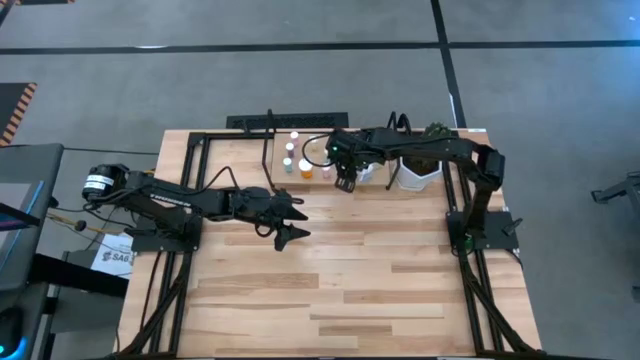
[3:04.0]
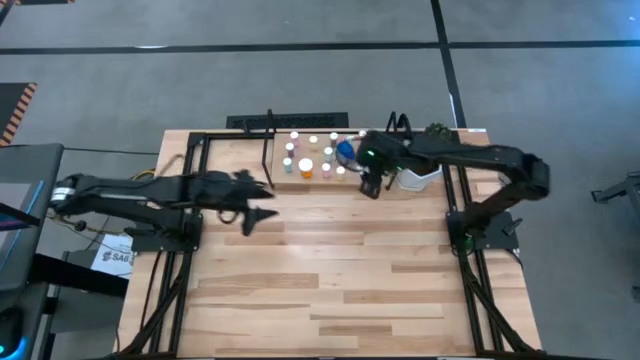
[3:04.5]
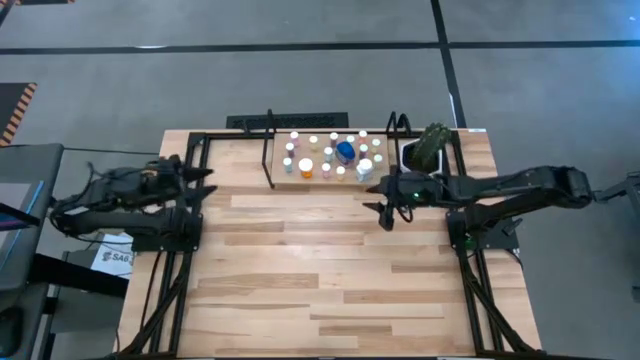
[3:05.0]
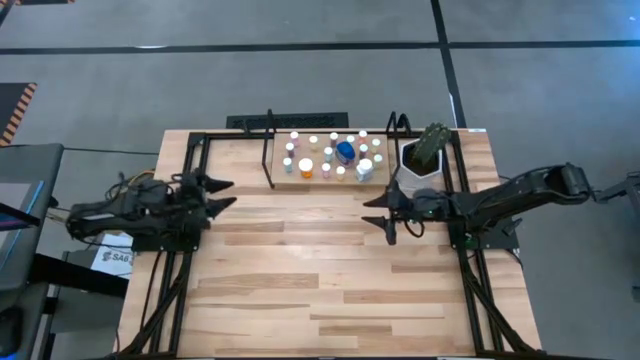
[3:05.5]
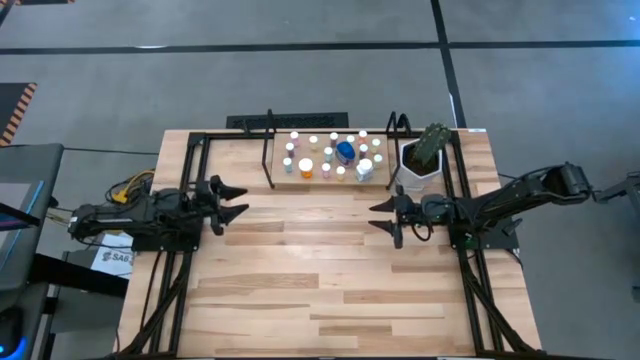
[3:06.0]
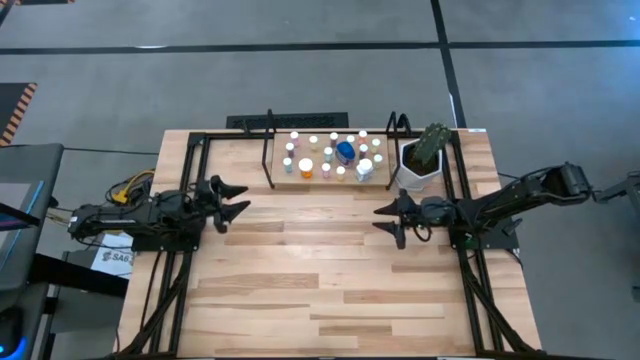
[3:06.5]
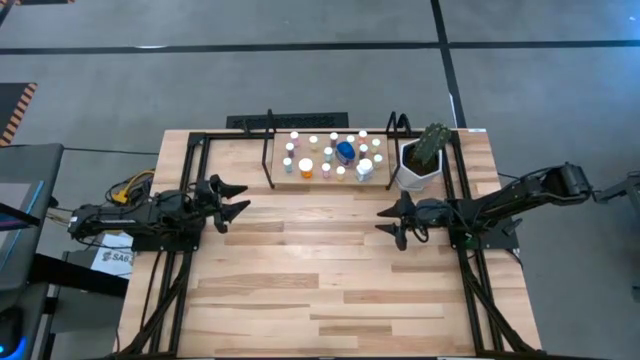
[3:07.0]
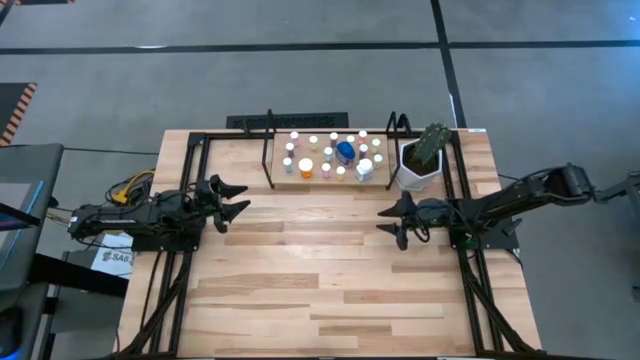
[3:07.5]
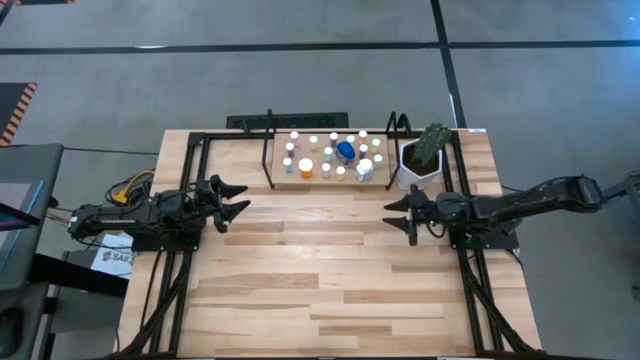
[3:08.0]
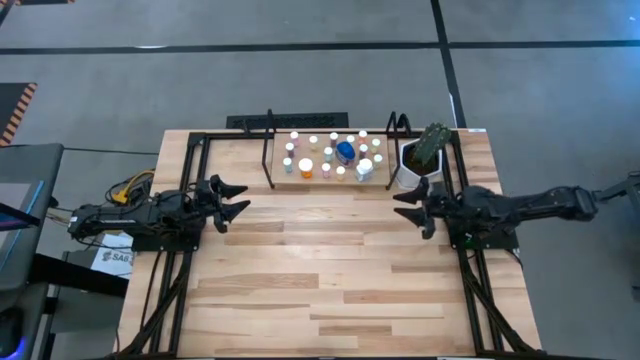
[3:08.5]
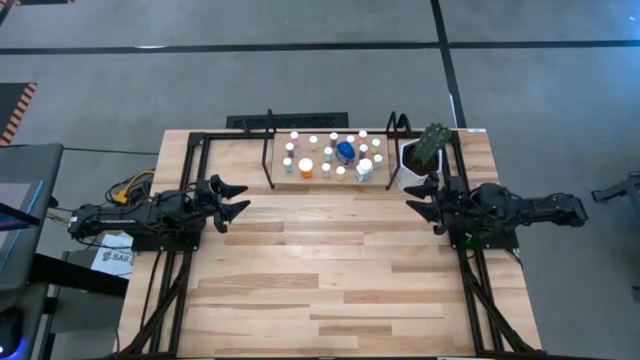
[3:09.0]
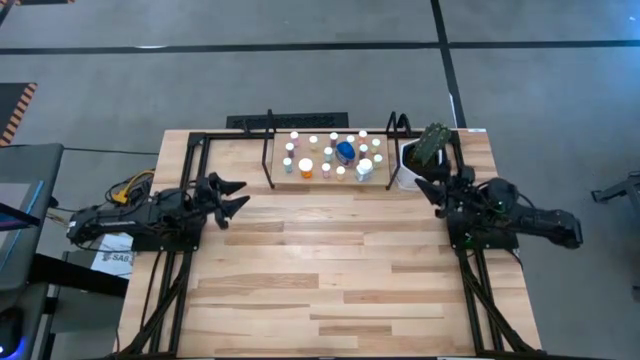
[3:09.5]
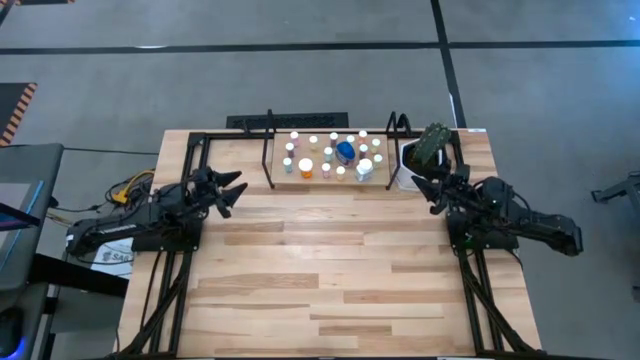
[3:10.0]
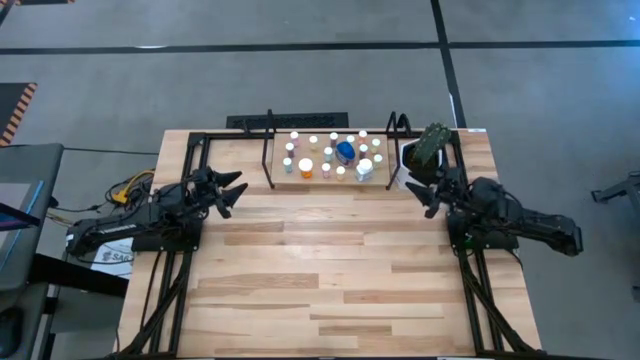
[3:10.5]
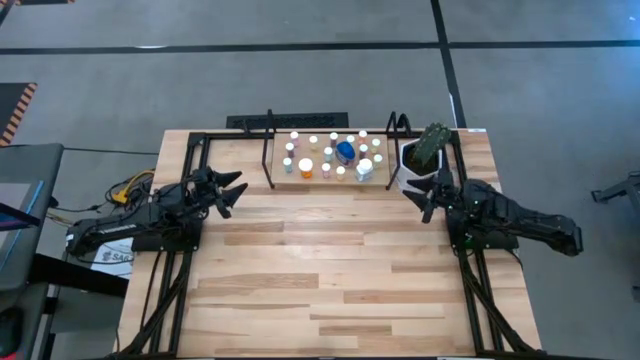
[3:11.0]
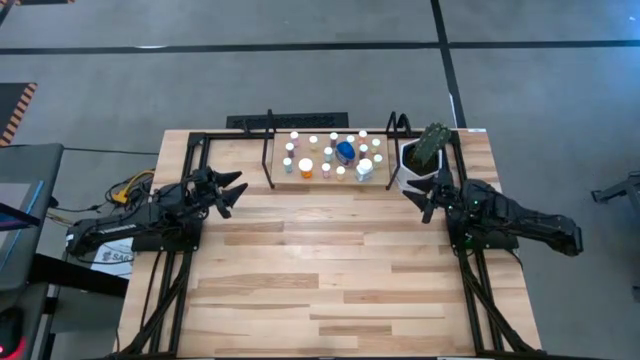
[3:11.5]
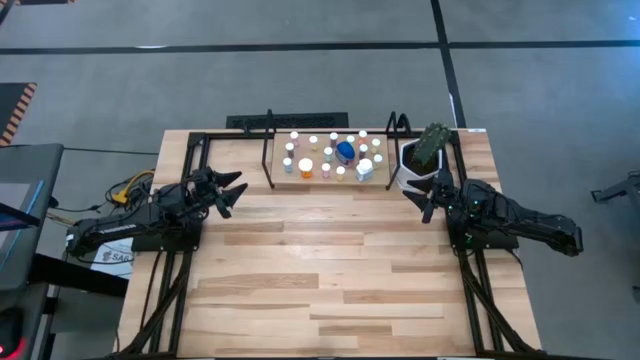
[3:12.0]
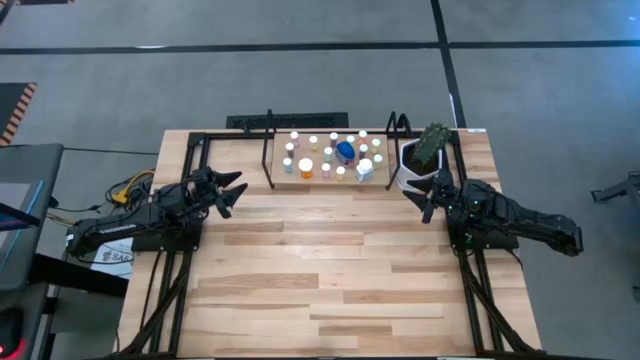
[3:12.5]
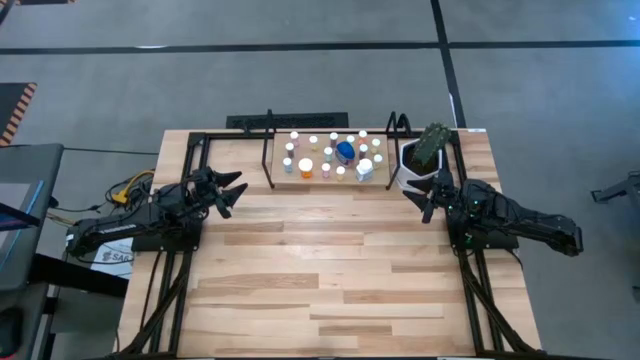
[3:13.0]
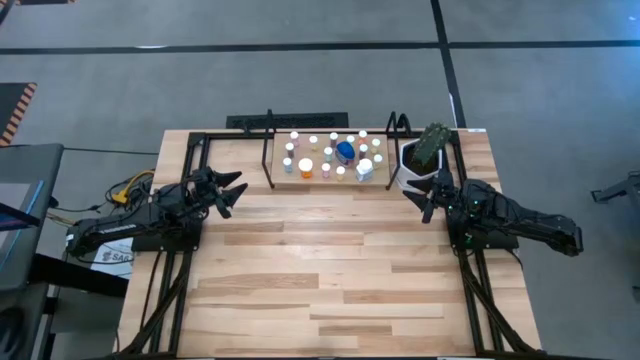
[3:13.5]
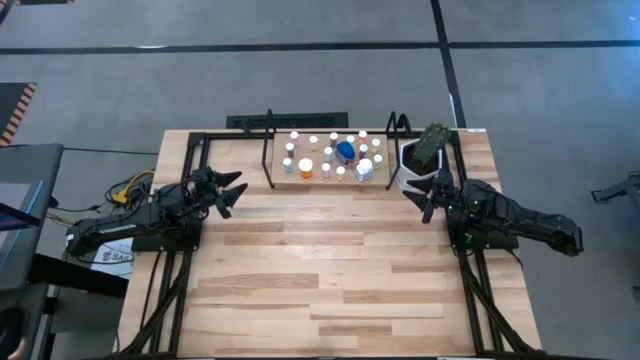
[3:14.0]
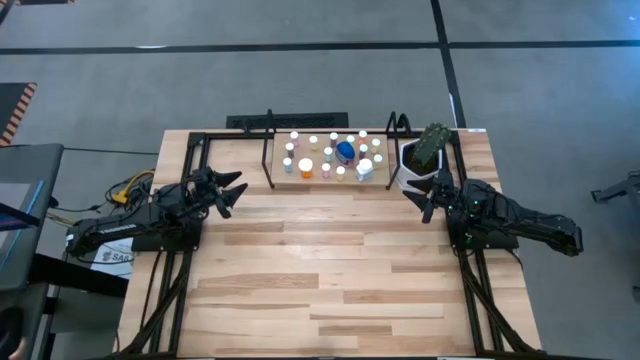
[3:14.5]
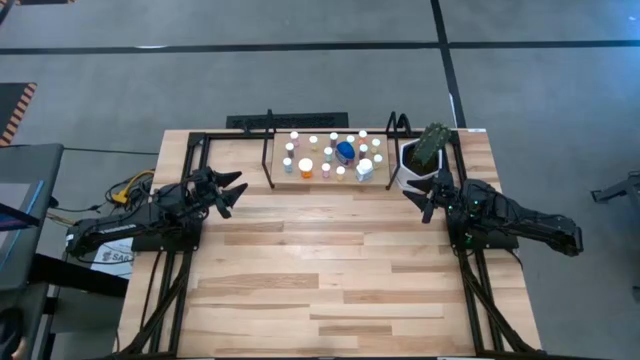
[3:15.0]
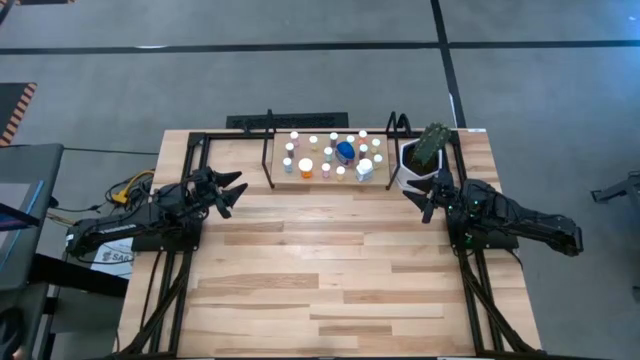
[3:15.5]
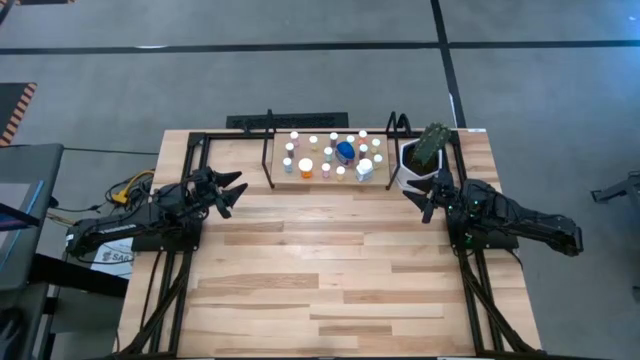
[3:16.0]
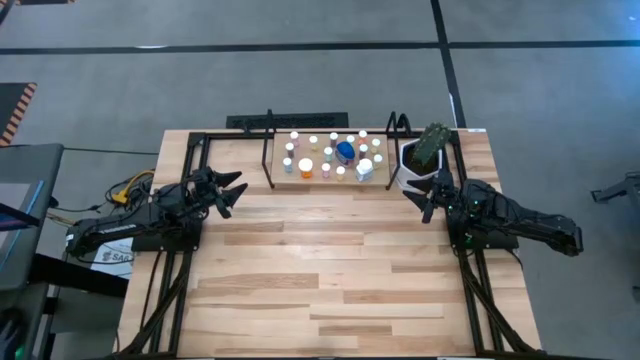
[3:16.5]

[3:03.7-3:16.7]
Task: Pick and place medicine bottles onto shelf by color
Return to Home position

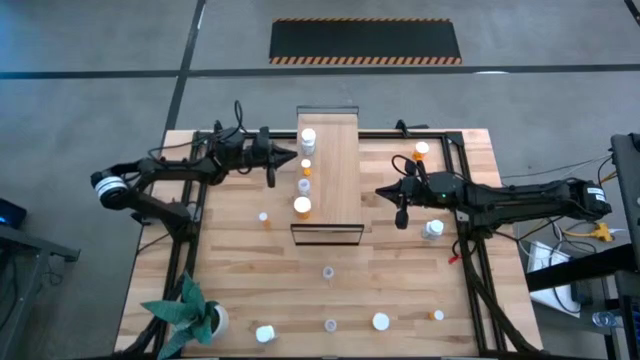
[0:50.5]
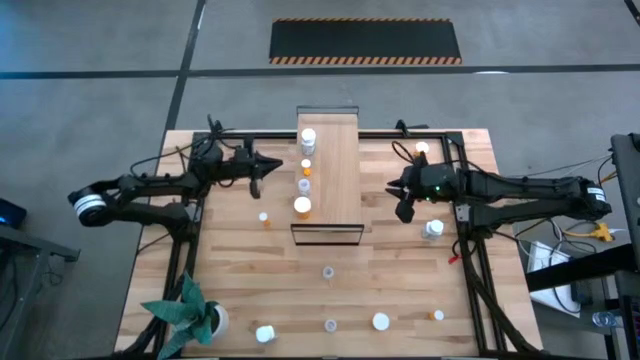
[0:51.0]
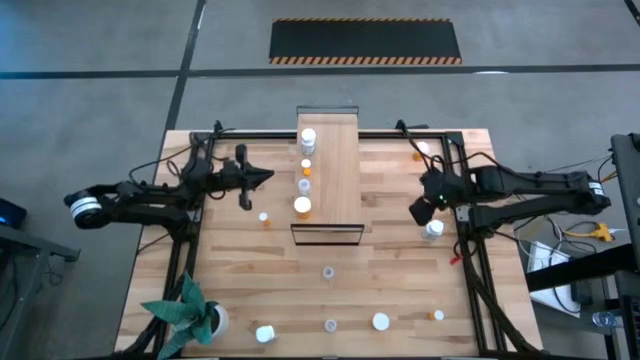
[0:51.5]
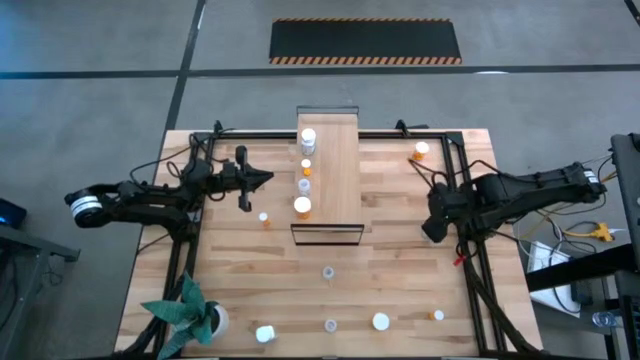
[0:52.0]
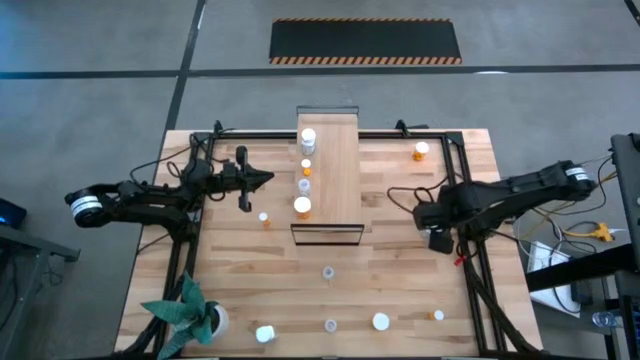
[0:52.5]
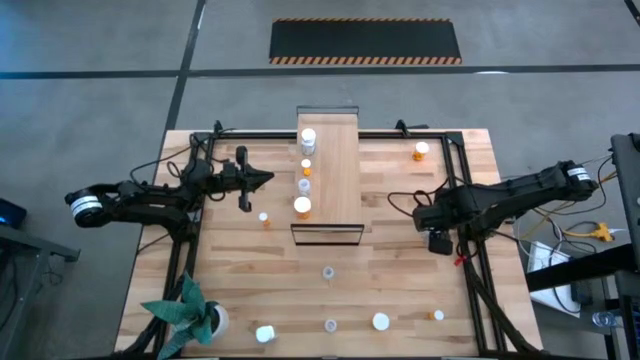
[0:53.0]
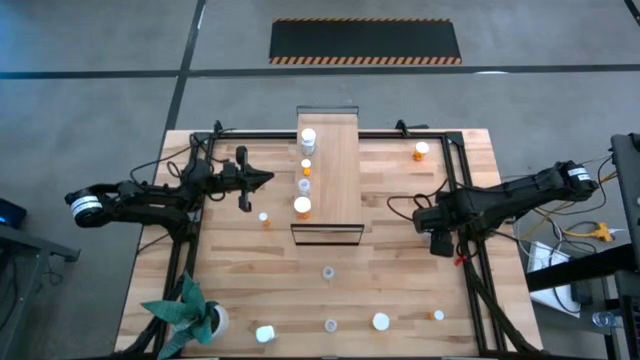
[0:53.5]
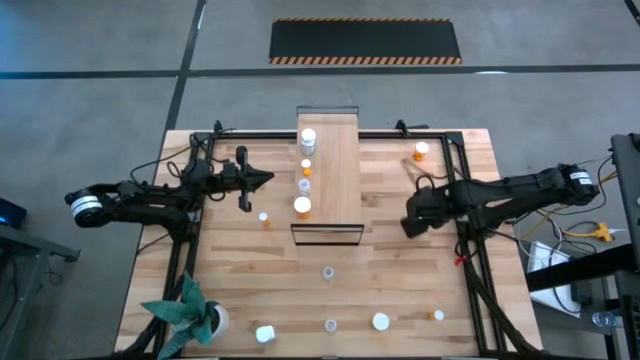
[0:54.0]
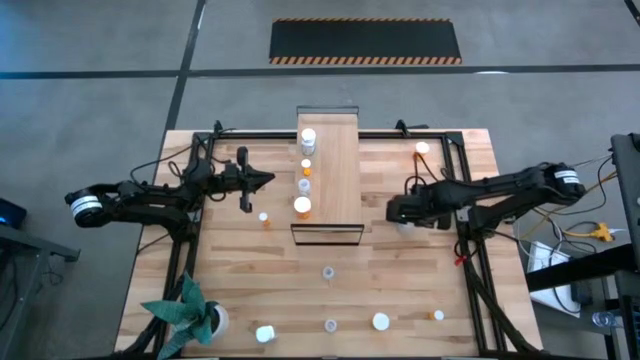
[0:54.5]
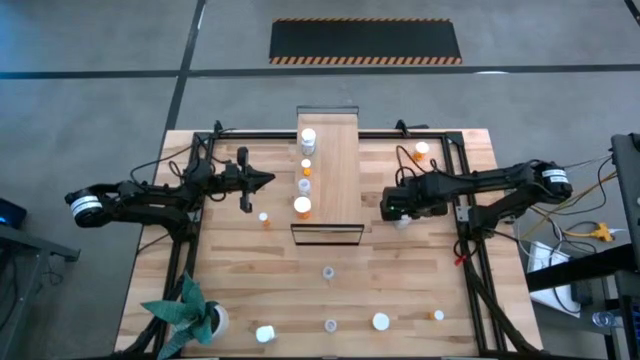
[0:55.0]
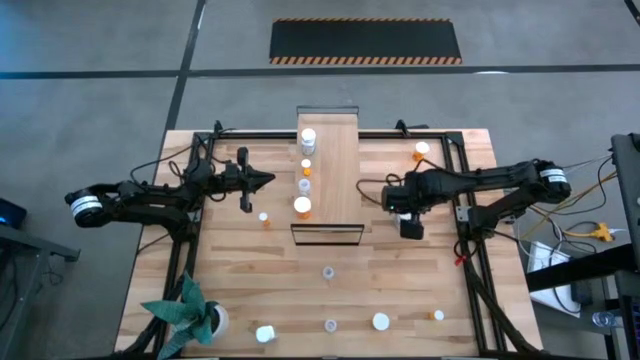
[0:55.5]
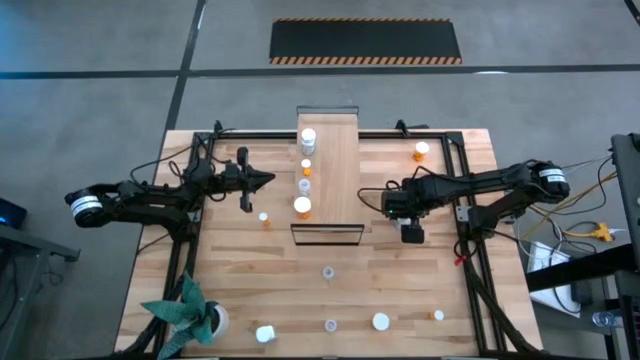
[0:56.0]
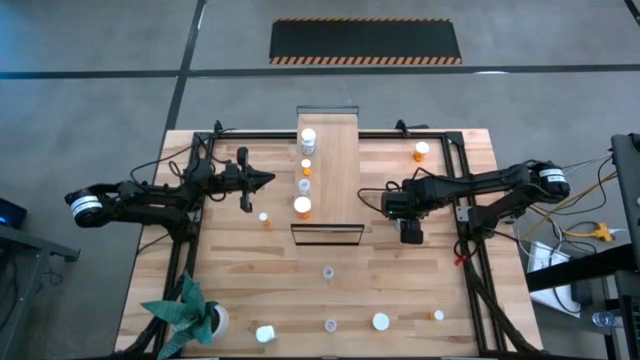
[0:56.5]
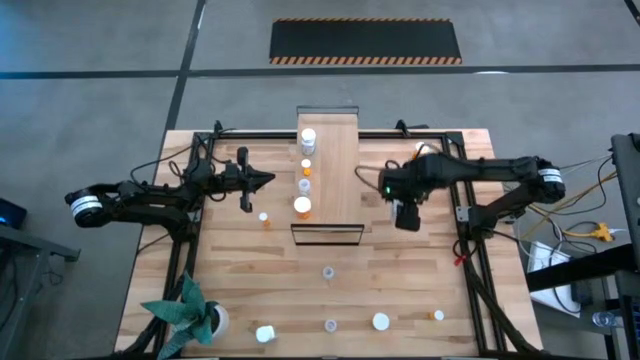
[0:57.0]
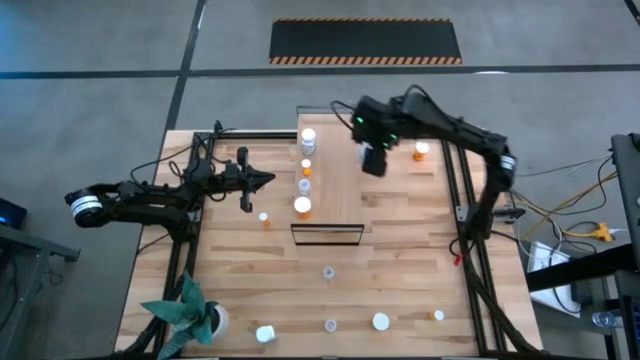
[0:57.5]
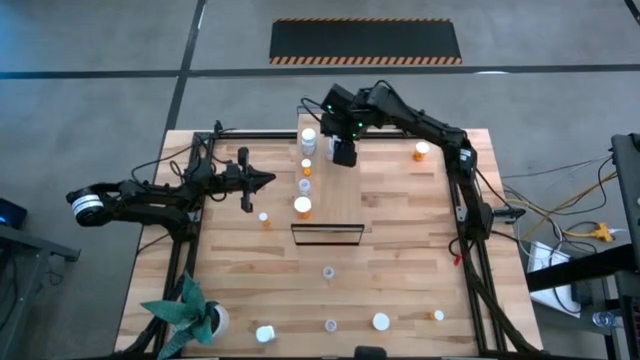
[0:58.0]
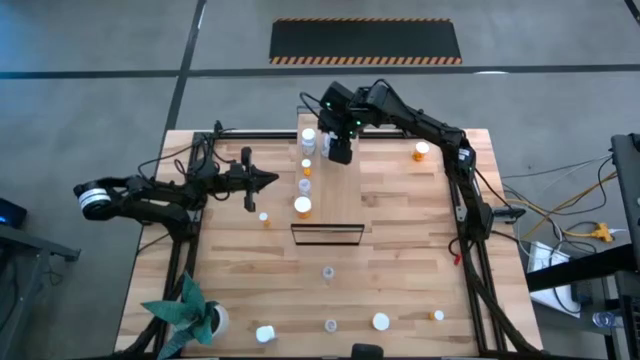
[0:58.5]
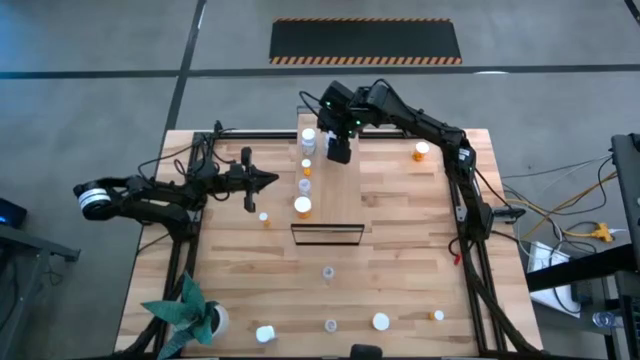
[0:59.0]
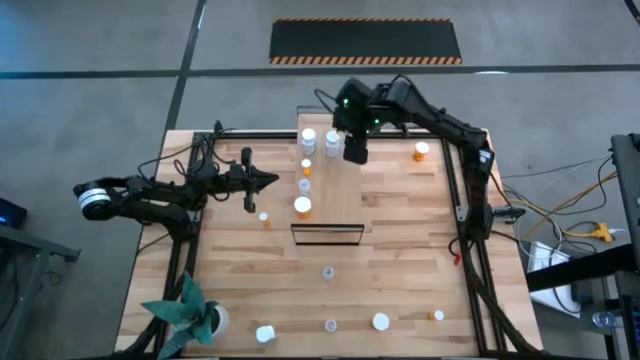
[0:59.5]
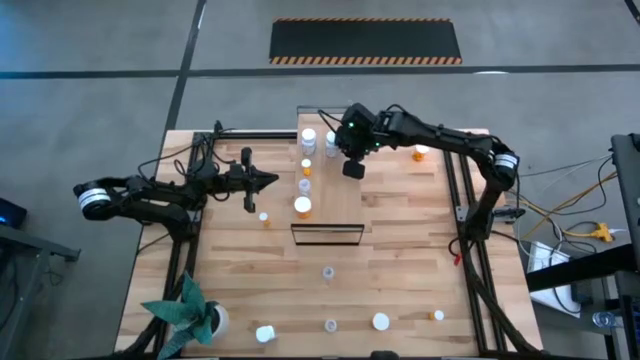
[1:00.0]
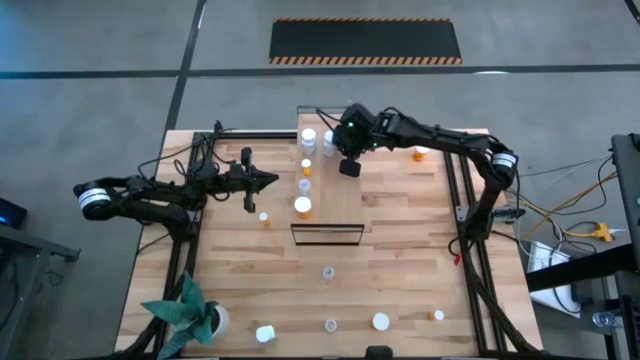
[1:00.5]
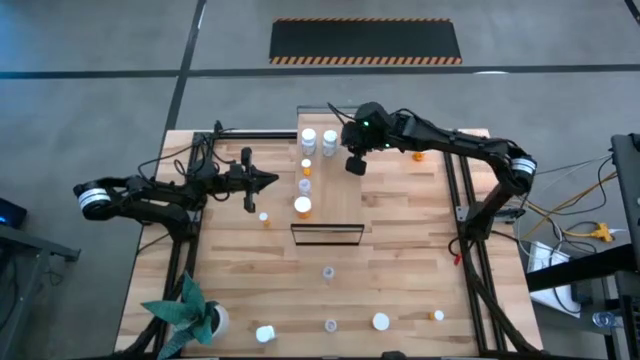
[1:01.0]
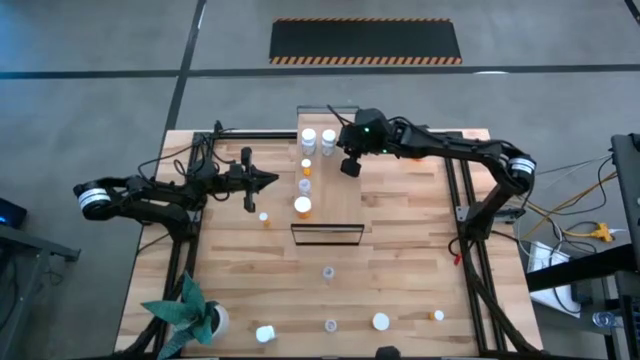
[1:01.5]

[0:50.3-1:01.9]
Task: Pick and place medicine bottles onto shelf by color
Put the top white pill bottle aligned with the other white pill bottle on the shelf
